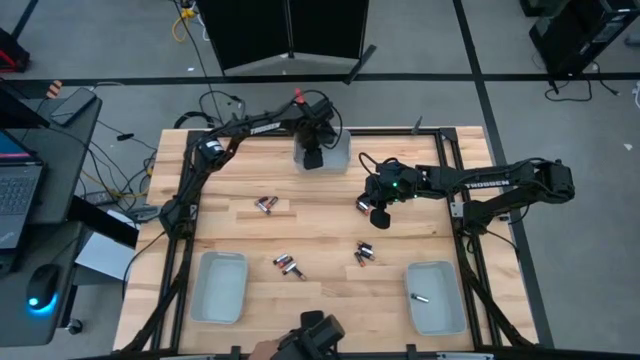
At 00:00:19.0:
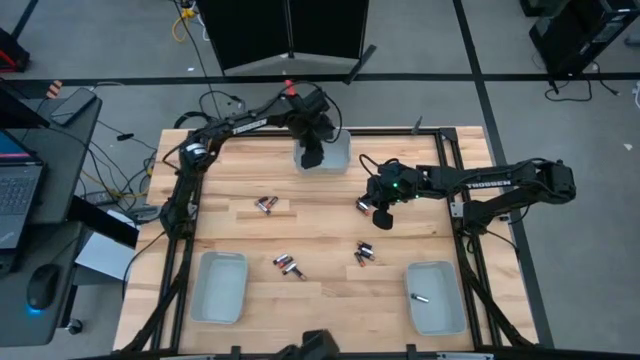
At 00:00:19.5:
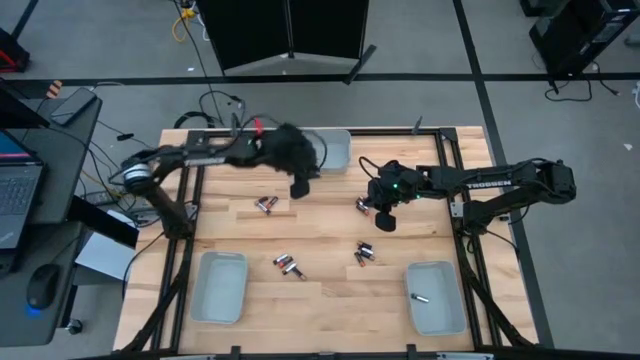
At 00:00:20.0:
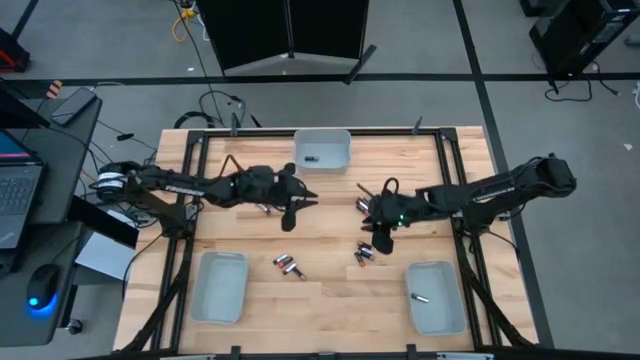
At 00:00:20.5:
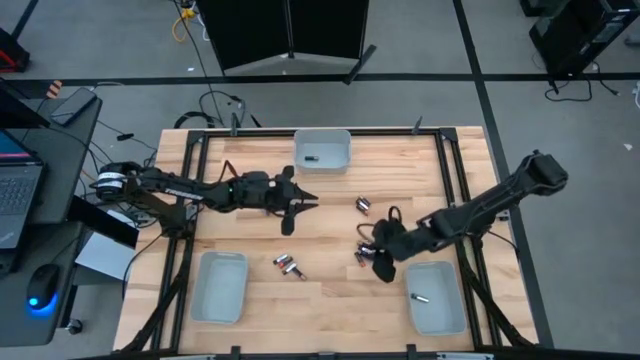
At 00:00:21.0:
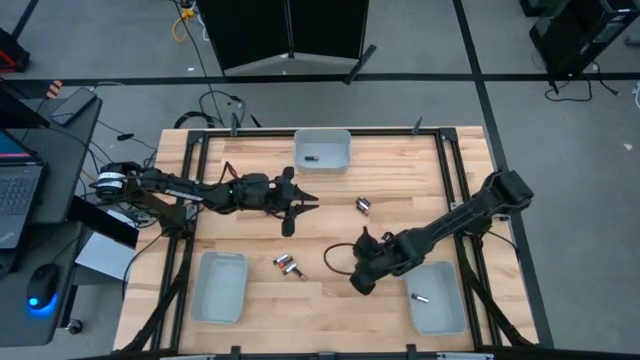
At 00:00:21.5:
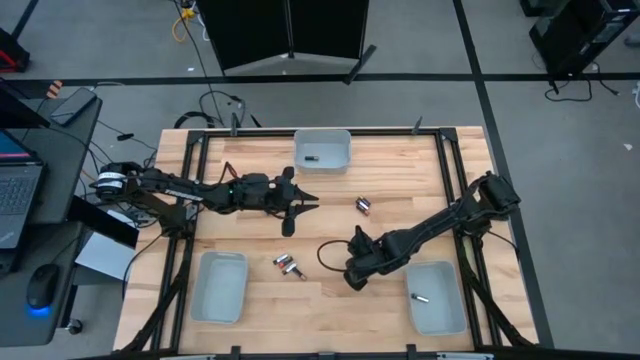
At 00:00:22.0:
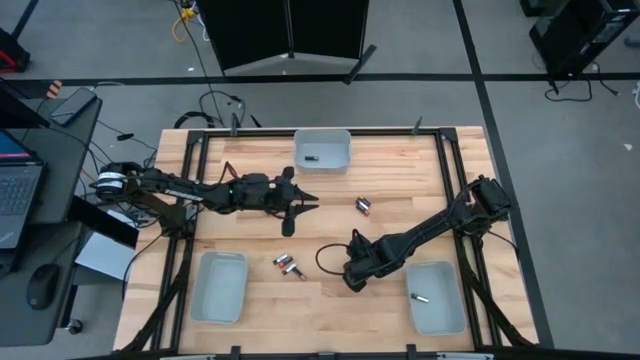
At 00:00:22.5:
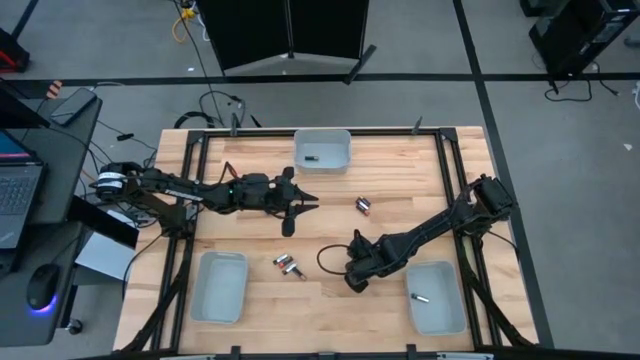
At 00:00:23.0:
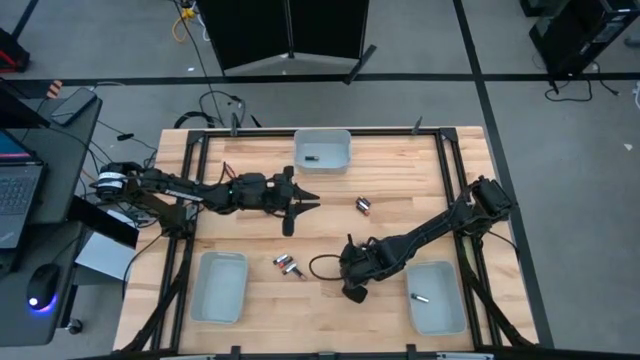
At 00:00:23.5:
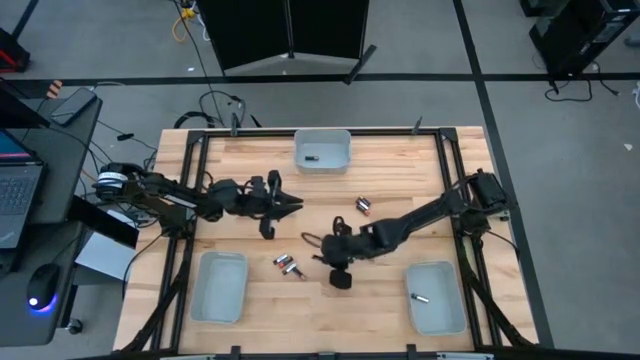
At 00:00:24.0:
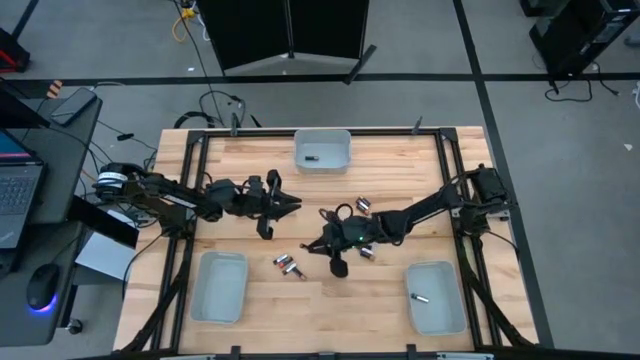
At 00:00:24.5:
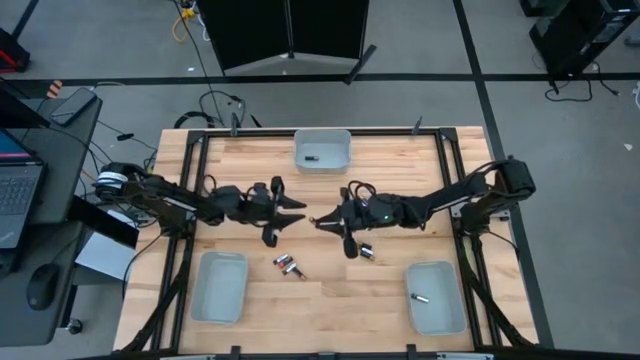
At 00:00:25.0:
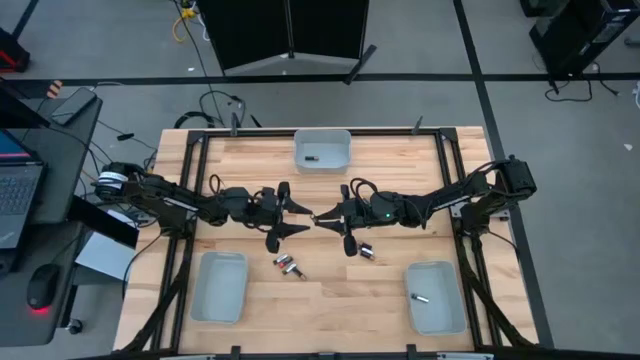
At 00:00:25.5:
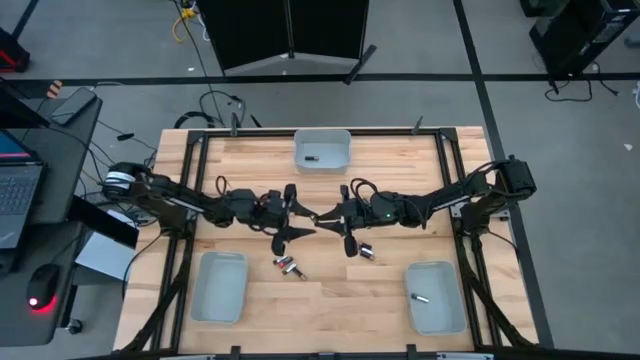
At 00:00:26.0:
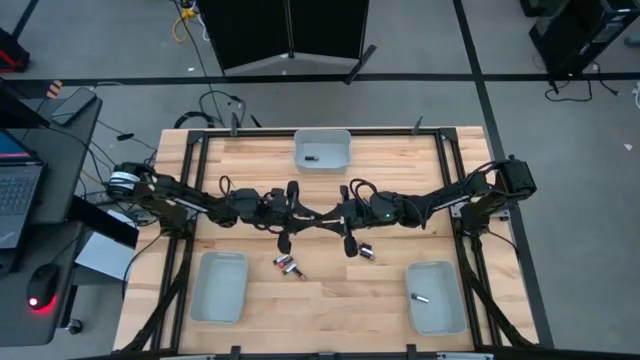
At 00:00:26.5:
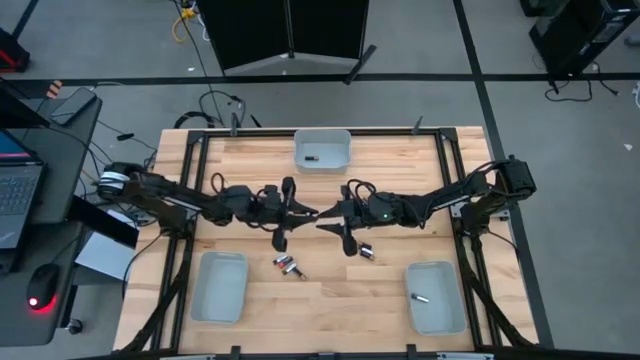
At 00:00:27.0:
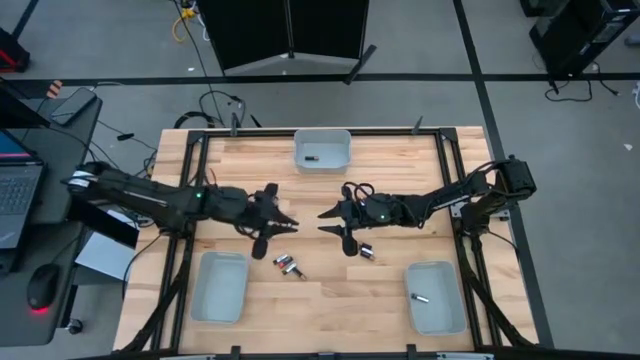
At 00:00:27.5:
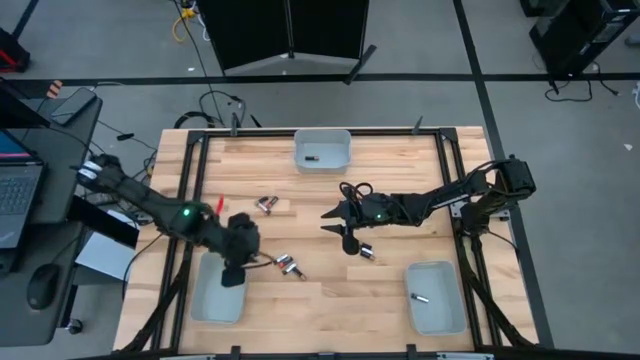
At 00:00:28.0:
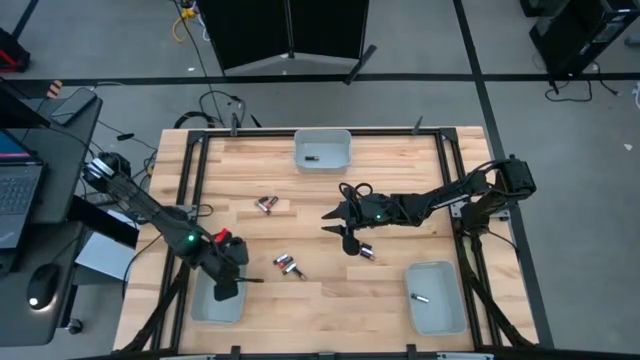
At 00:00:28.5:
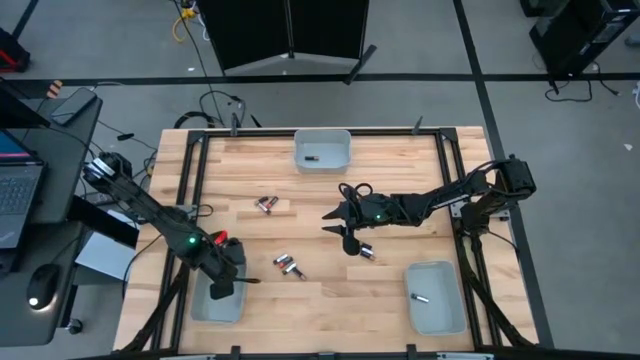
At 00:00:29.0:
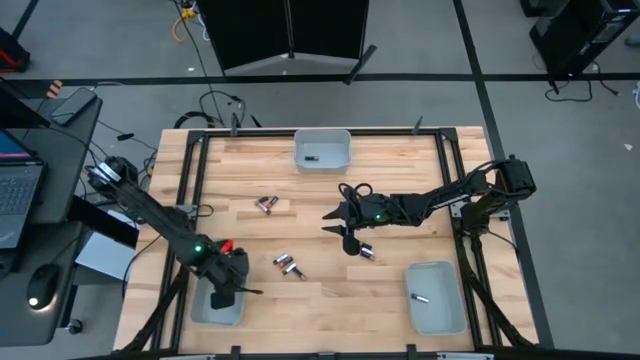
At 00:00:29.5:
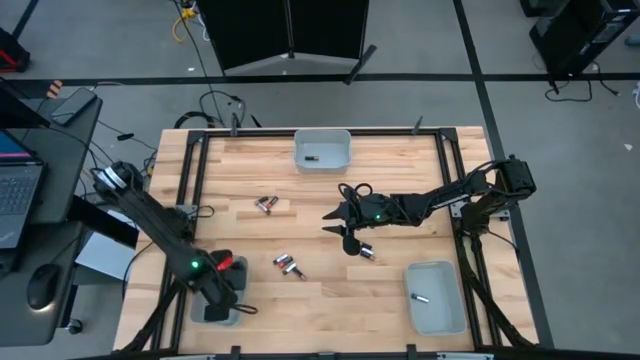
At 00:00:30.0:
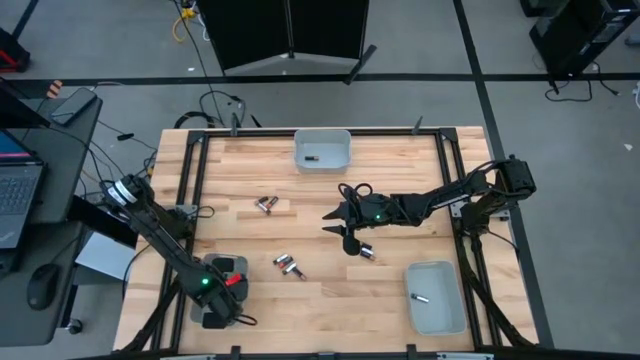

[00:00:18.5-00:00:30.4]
Task: Sort batteries
Put the red battery into the bottom left gray bin

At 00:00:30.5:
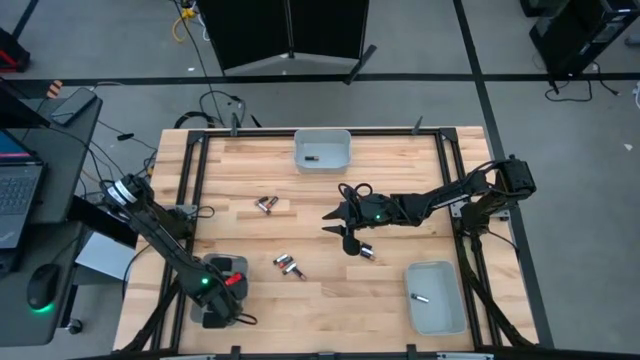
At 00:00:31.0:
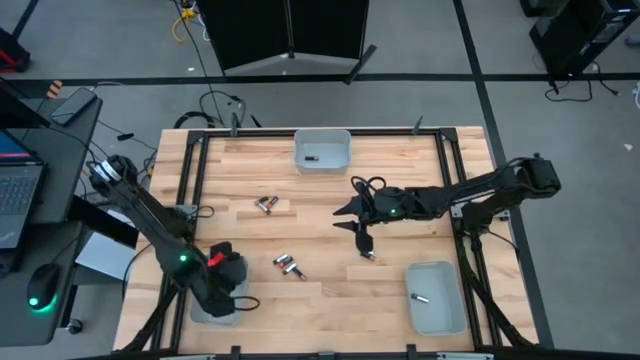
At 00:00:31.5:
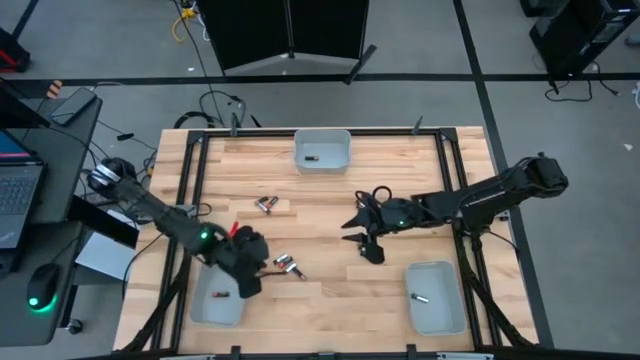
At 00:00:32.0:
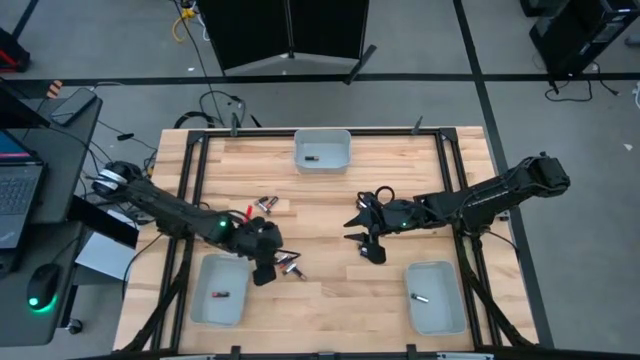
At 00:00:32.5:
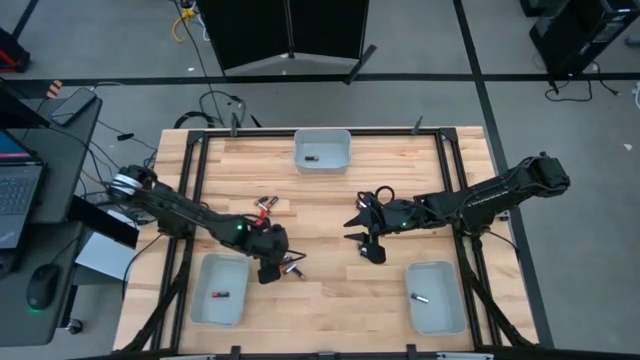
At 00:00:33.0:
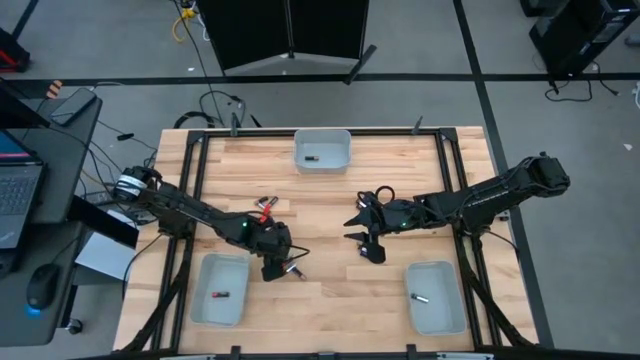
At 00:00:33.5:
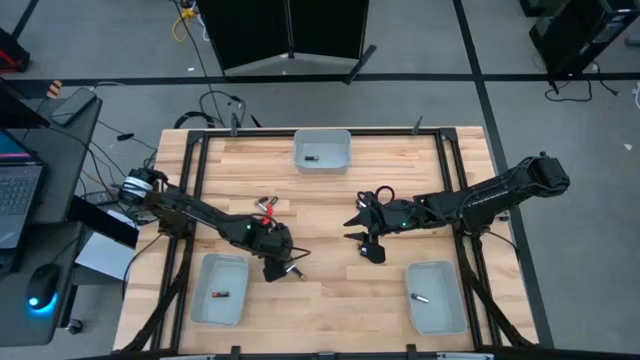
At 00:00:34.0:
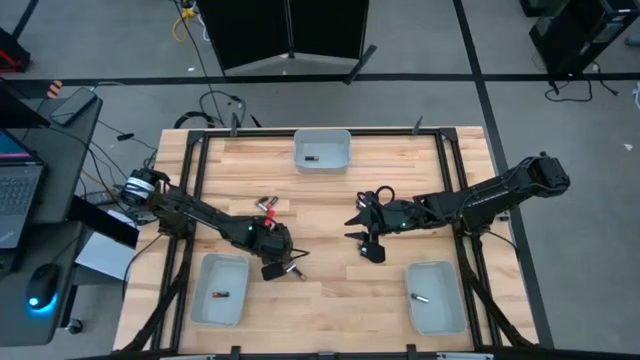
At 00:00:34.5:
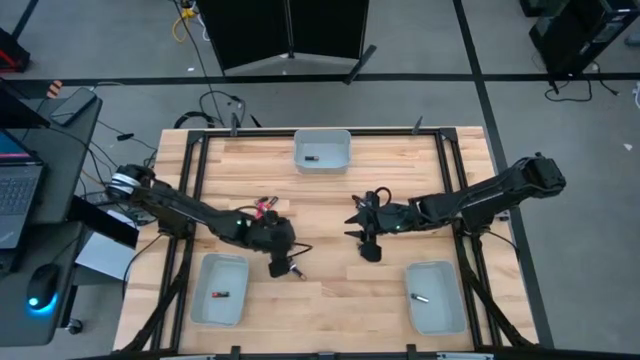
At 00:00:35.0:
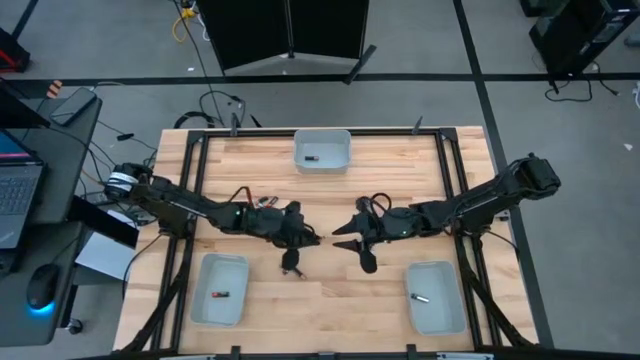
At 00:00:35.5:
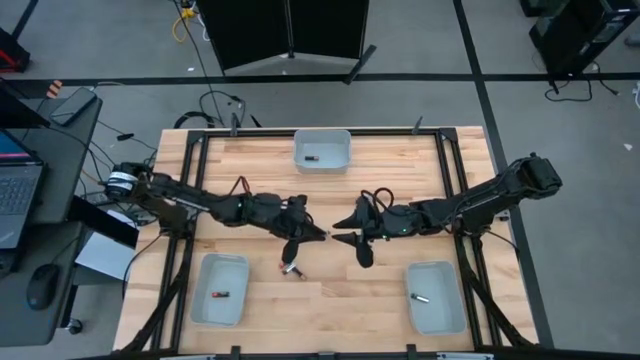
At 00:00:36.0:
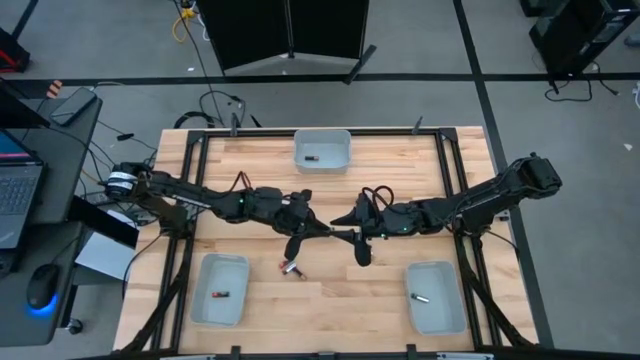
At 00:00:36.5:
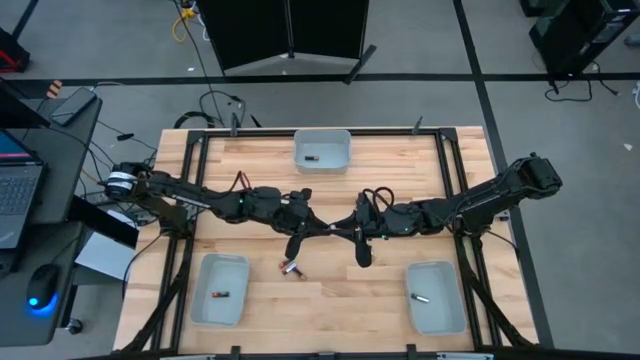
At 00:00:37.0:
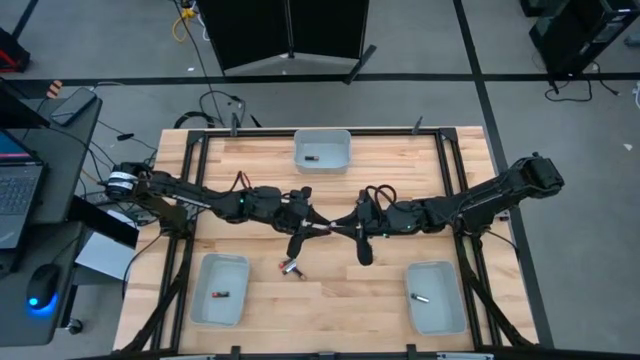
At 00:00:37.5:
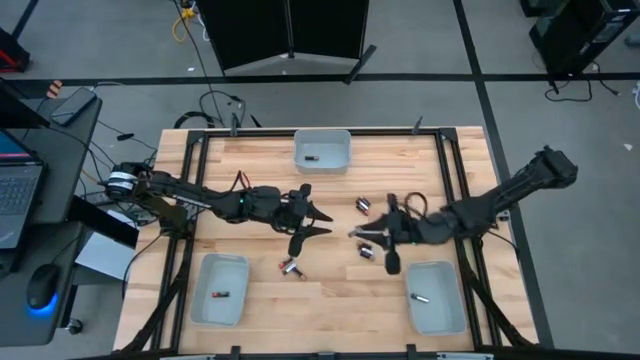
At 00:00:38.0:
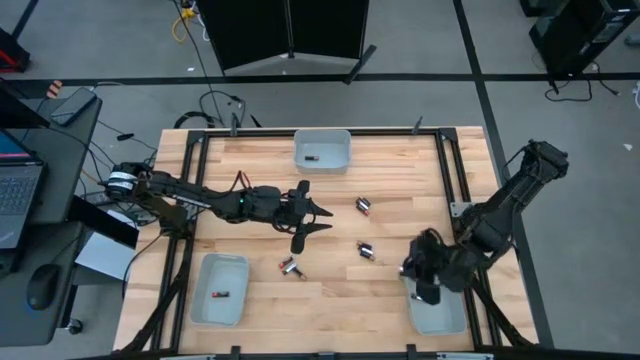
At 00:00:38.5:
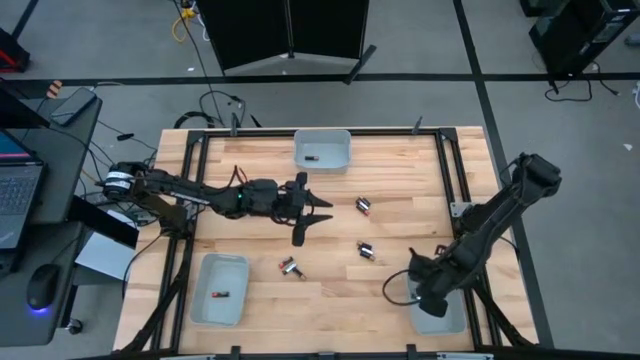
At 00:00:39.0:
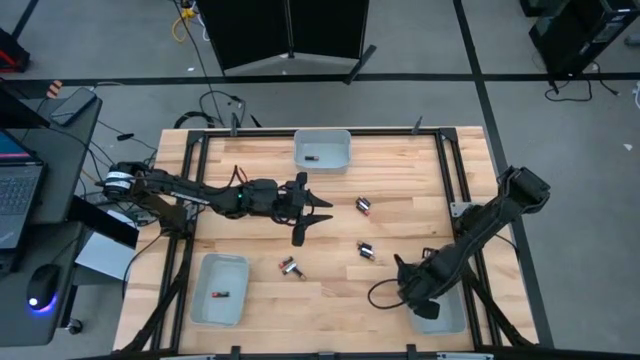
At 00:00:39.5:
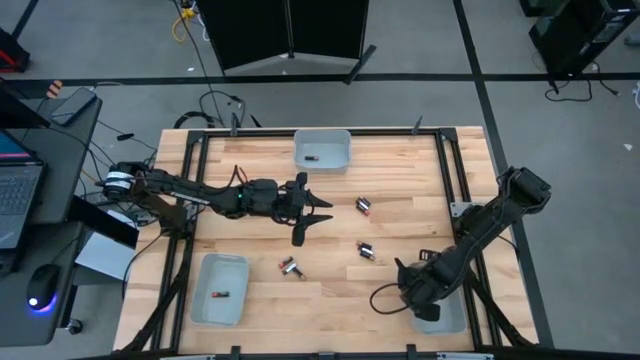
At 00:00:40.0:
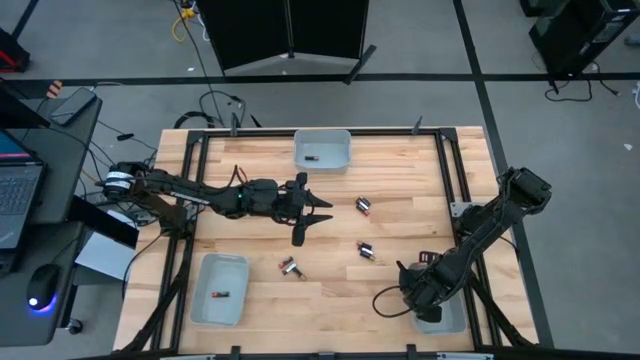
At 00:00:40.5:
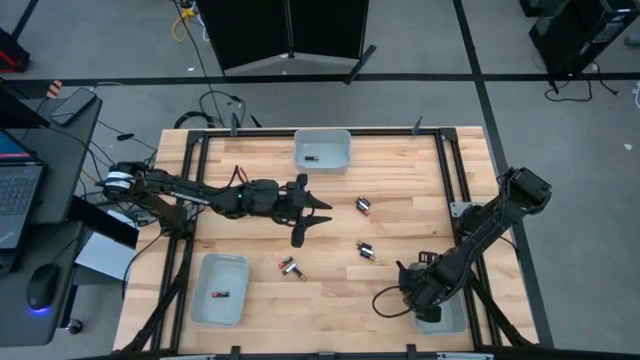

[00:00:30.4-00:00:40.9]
Put the silver battery into the bottom right gray bin
